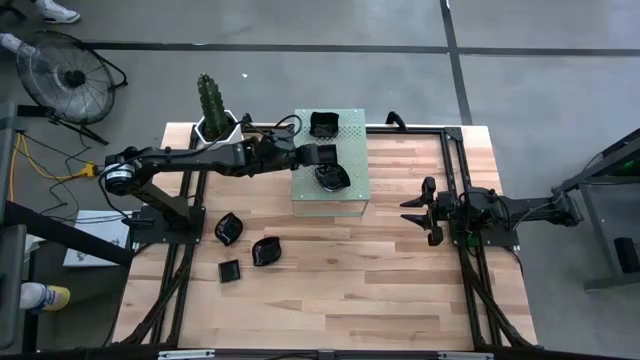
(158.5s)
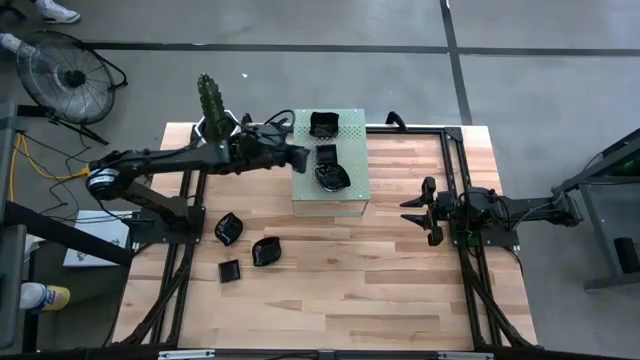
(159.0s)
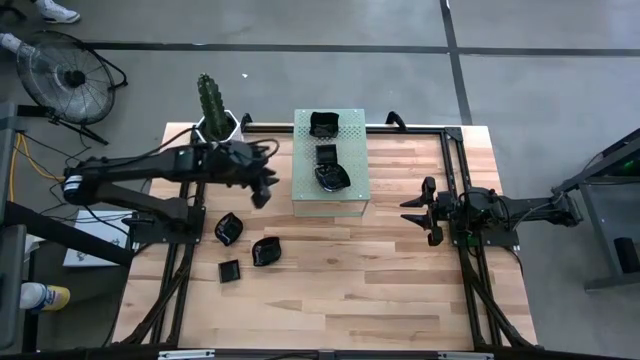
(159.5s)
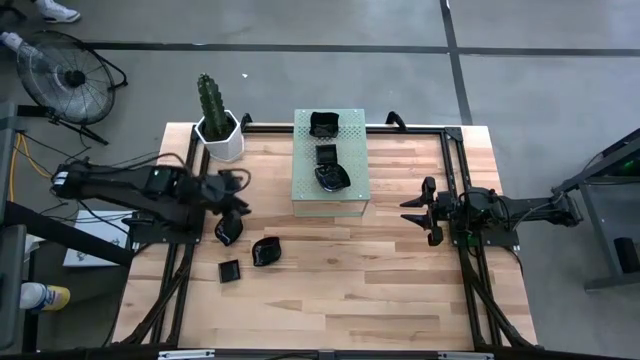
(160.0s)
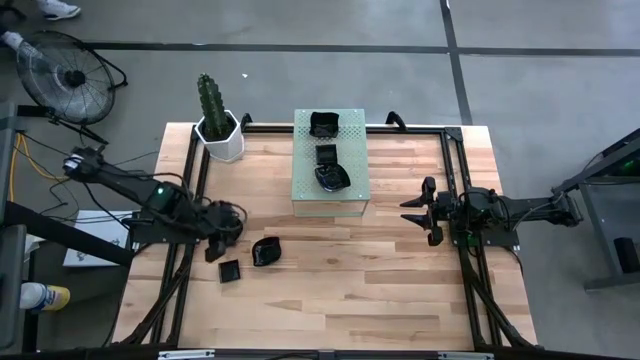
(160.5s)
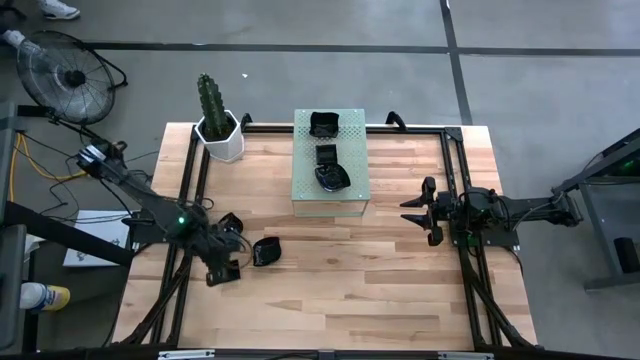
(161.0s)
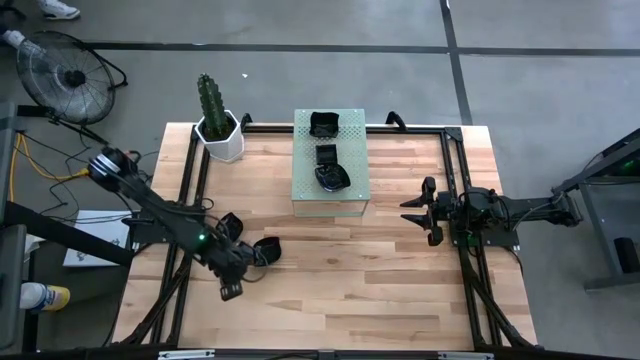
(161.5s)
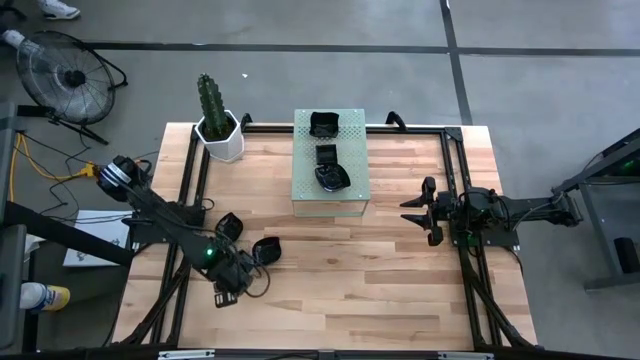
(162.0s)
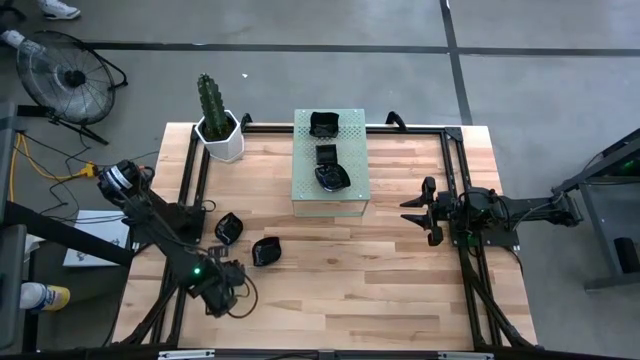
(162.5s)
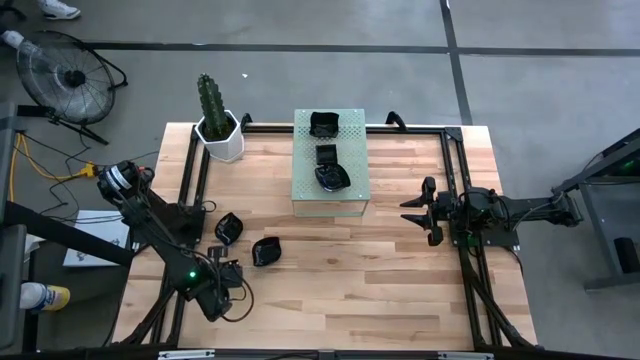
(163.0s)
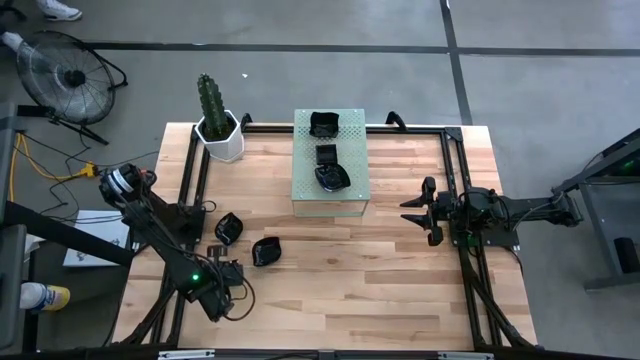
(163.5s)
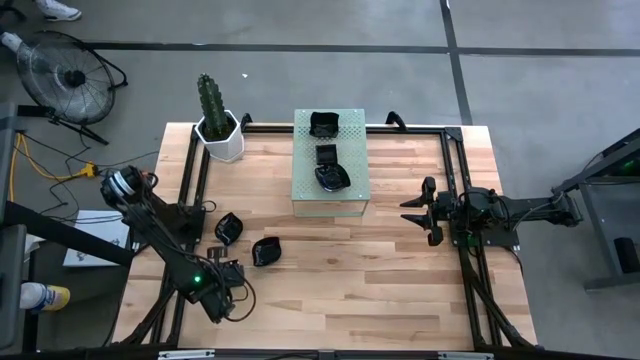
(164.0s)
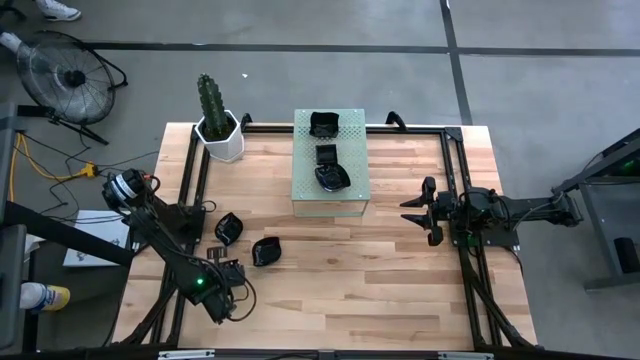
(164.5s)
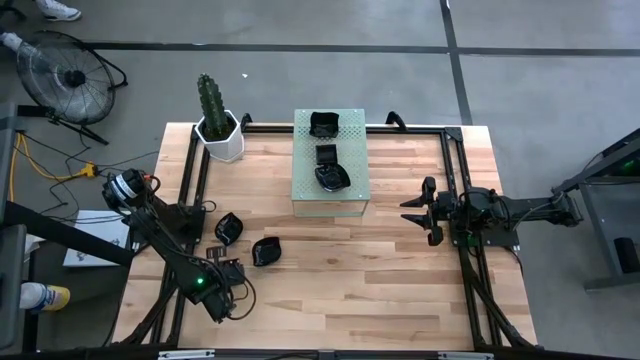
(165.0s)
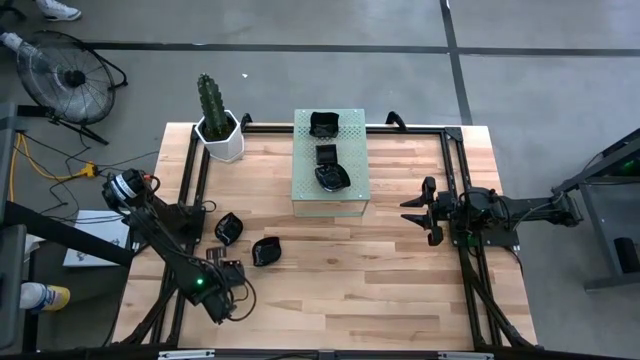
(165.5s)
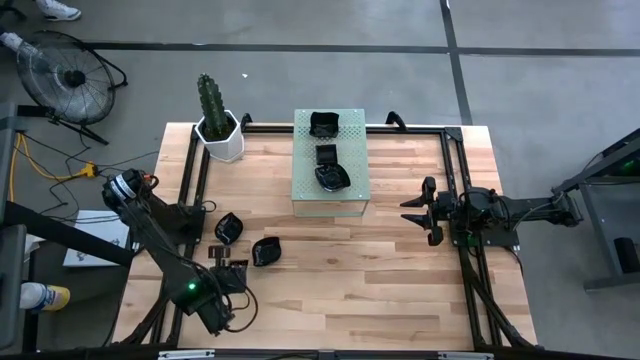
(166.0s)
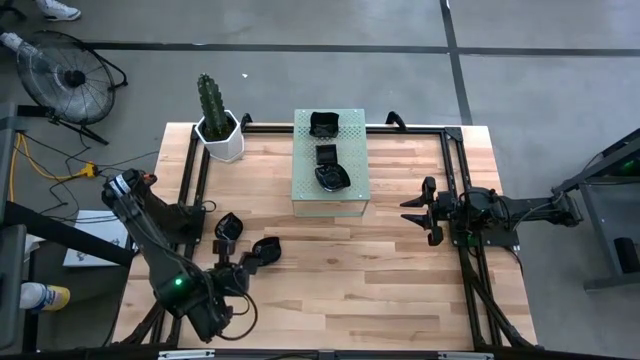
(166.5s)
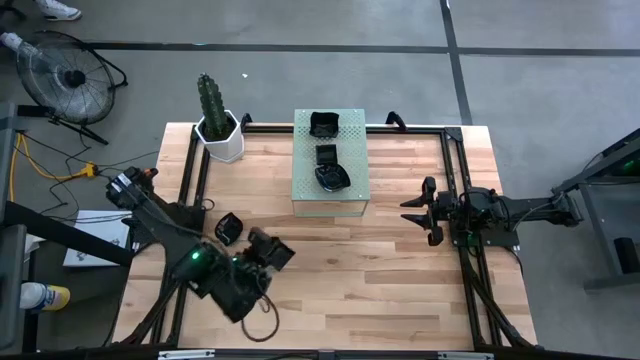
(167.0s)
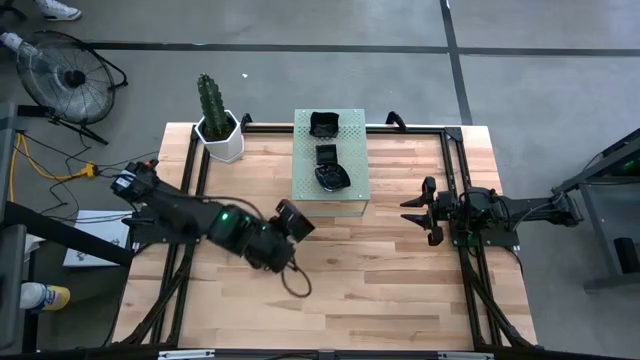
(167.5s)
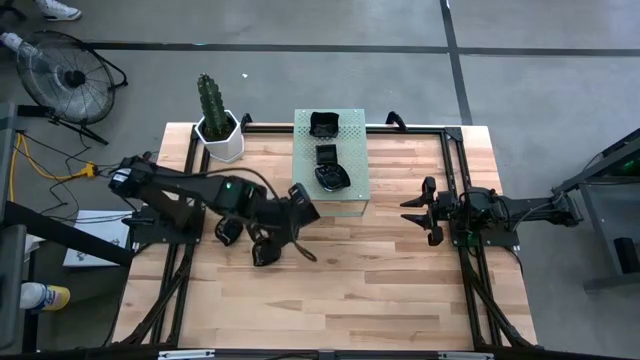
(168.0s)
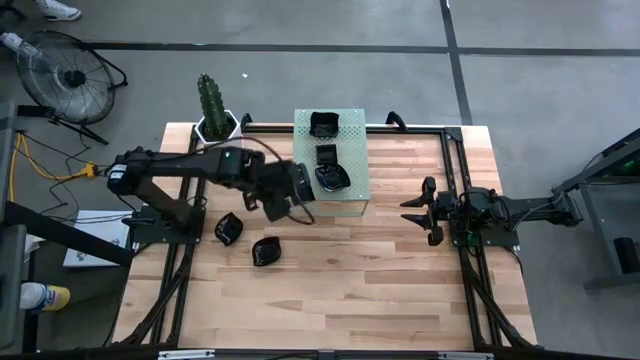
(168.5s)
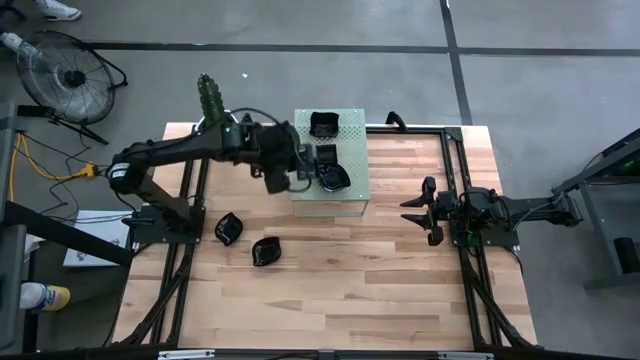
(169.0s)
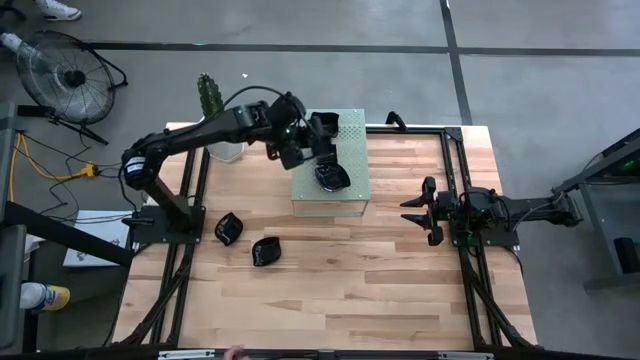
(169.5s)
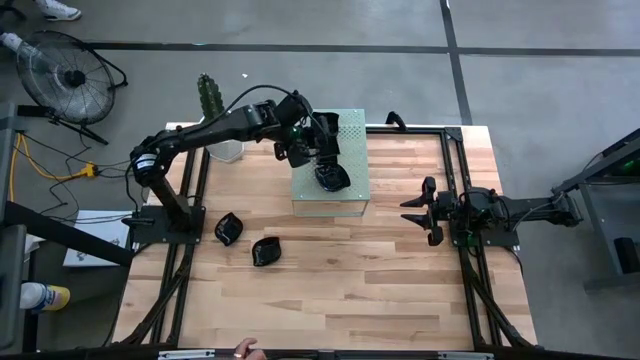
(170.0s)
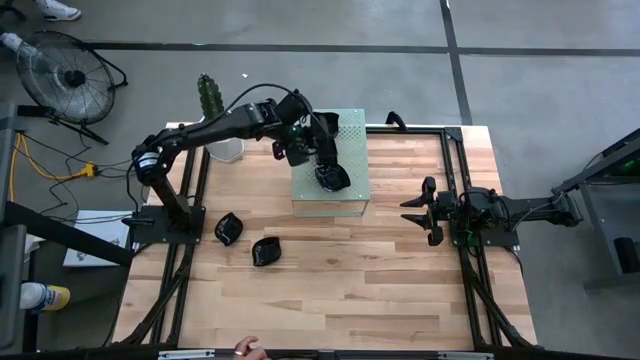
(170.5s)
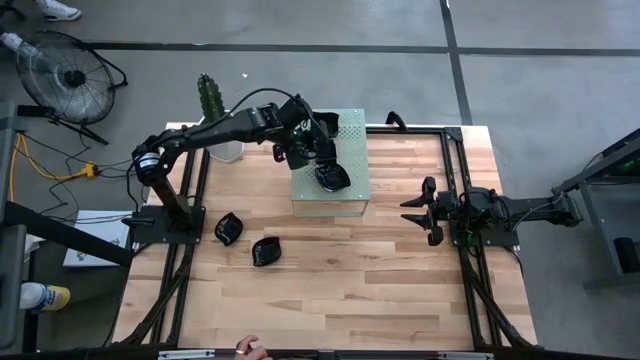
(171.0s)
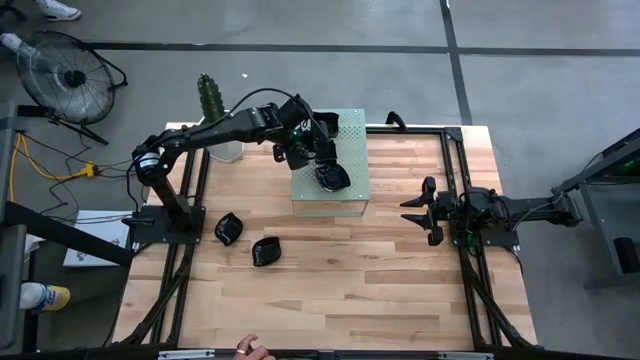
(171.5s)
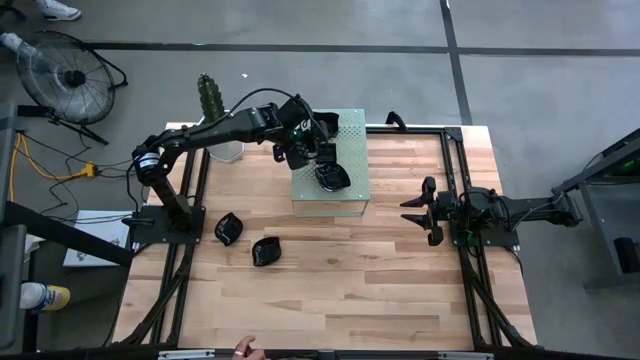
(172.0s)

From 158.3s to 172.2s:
Task: Pick & Place Mini shaped plates
Stack the black square plate on top of the black square plate on the shelf

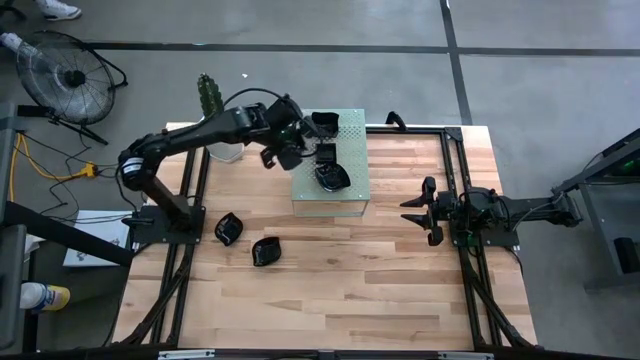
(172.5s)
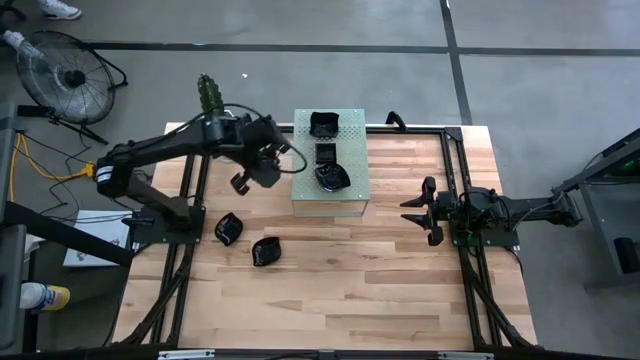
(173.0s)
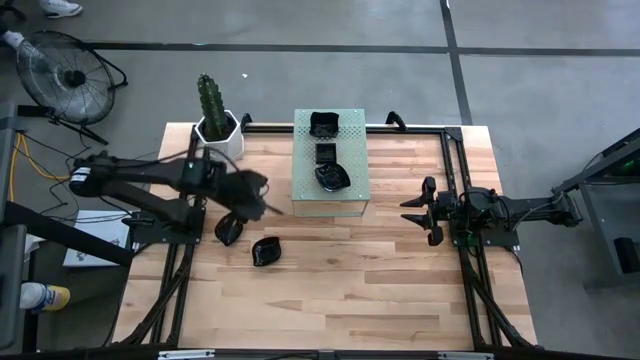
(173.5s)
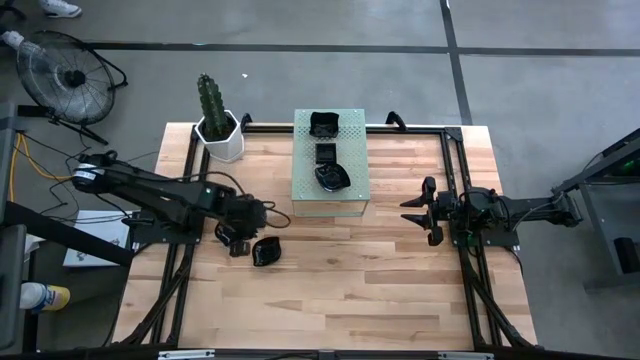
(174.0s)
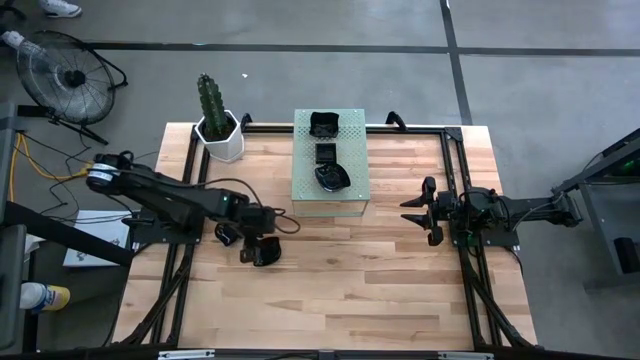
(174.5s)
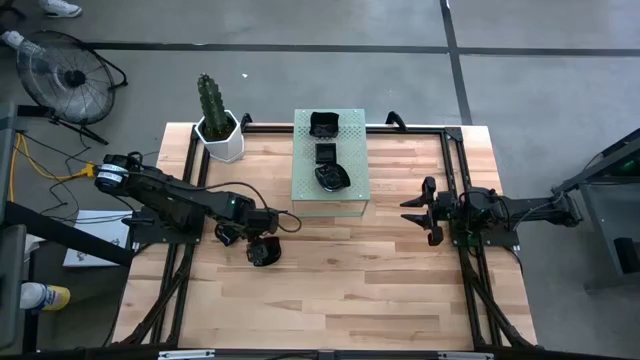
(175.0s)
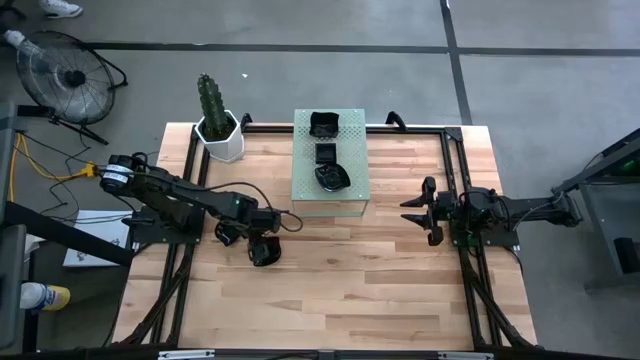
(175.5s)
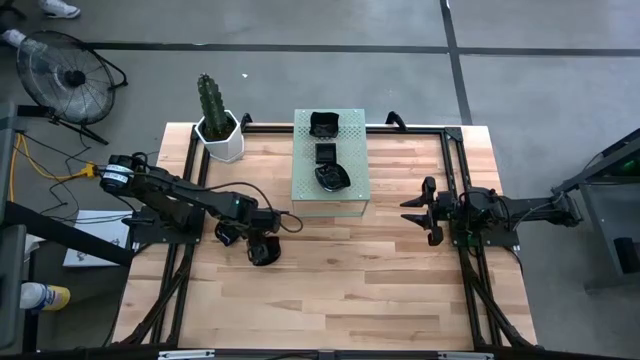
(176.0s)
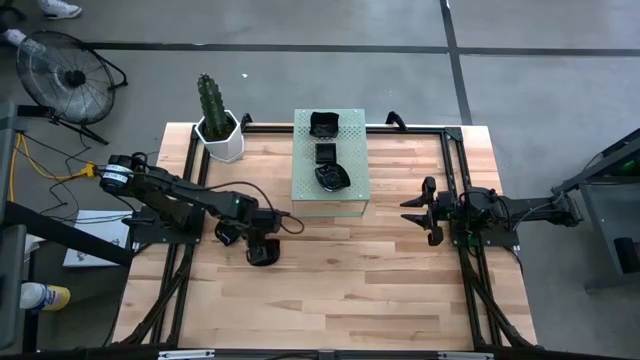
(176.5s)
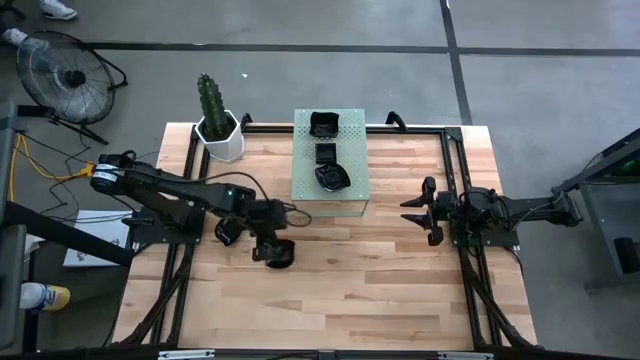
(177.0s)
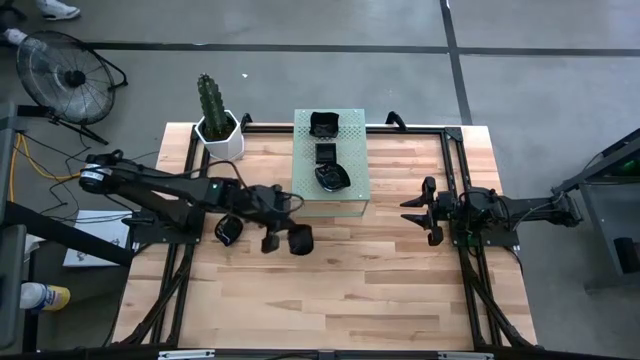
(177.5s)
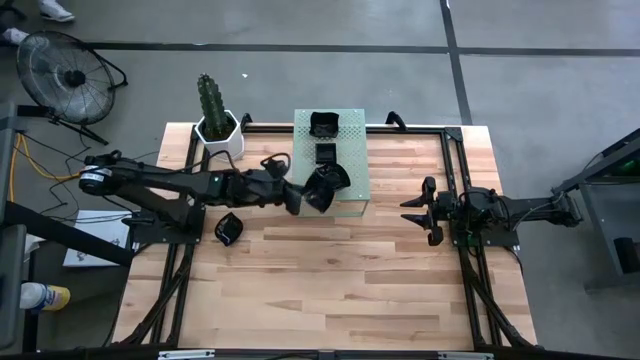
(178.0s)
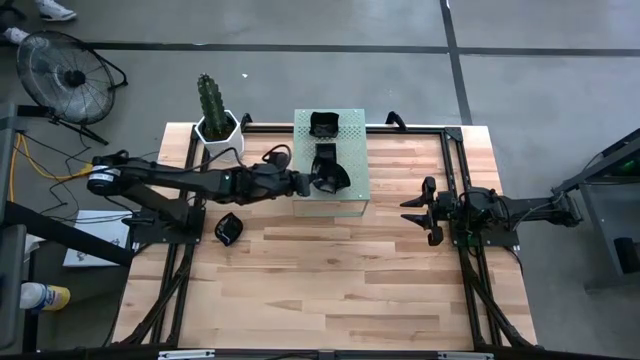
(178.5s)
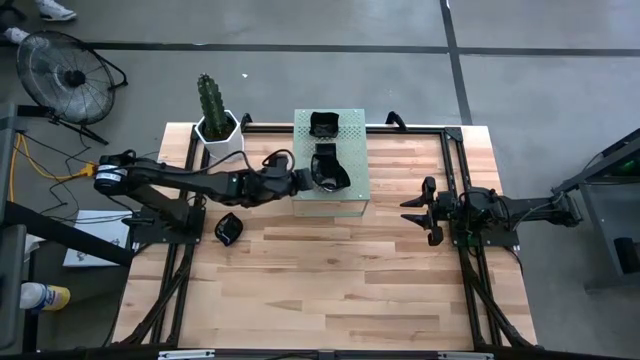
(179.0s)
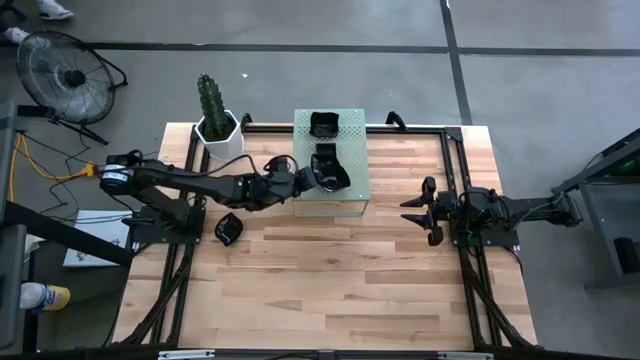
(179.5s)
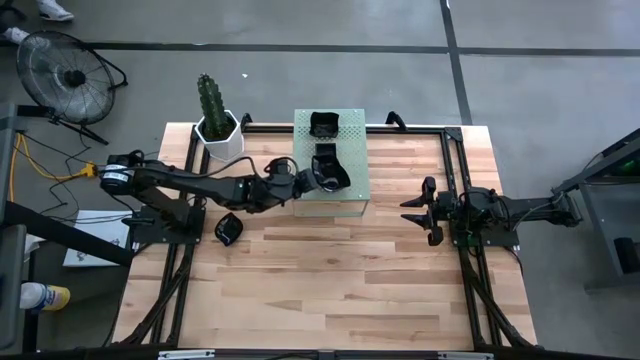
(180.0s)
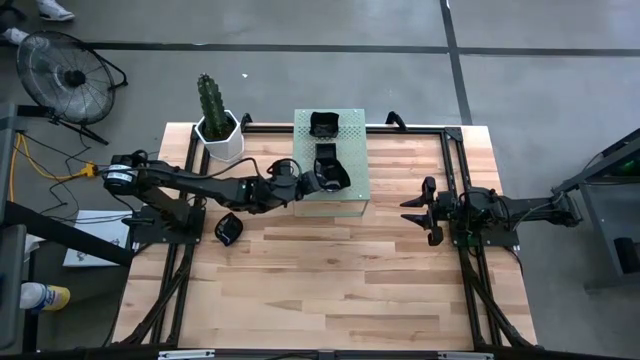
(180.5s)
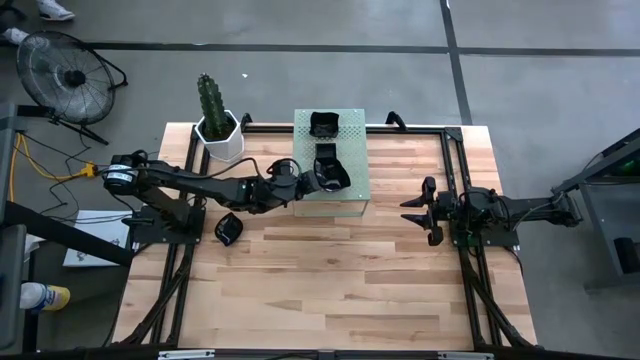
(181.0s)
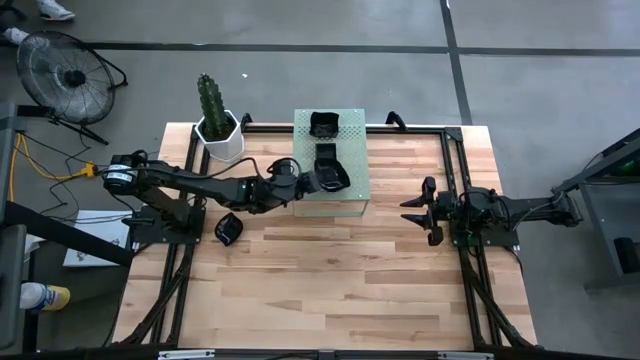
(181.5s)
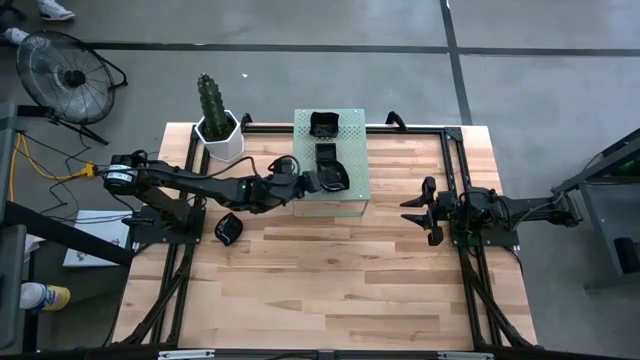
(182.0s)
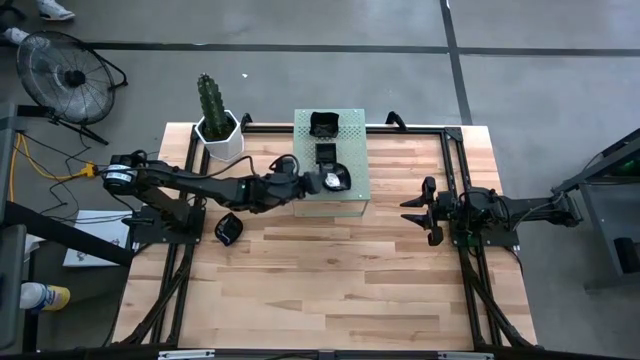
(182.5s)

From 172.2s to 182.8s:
Stack the black leaf shaped plate on top of the black leaf shaped plate on the shelf
